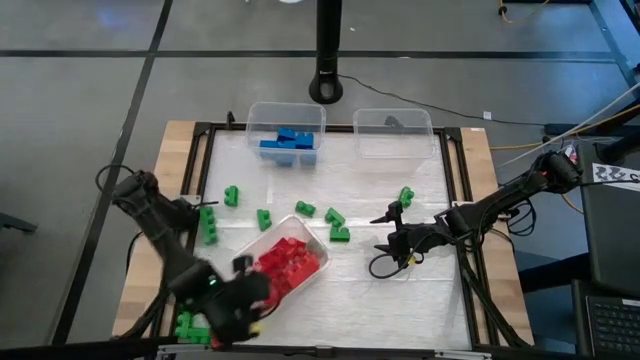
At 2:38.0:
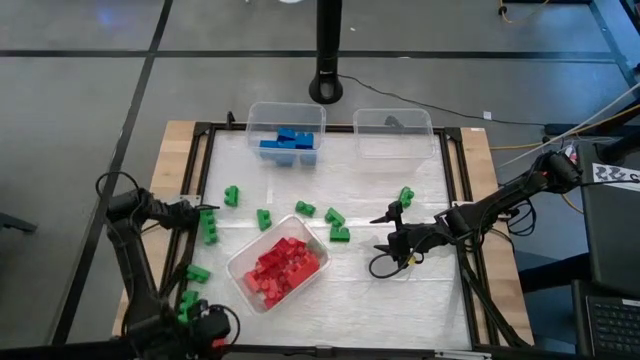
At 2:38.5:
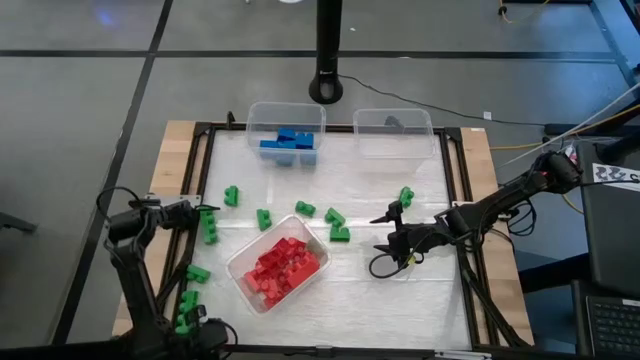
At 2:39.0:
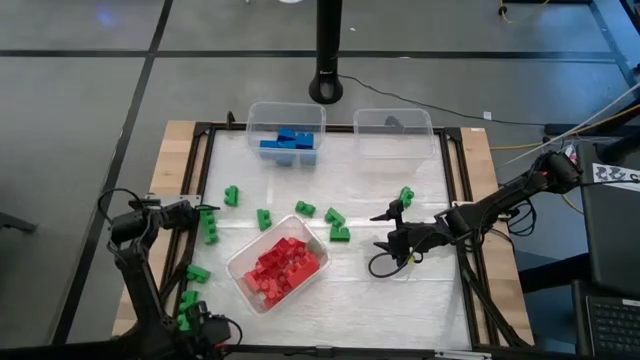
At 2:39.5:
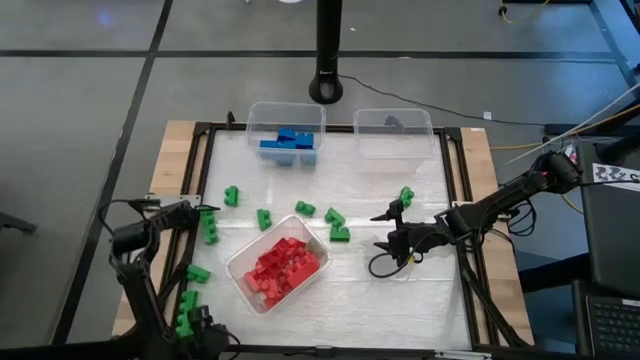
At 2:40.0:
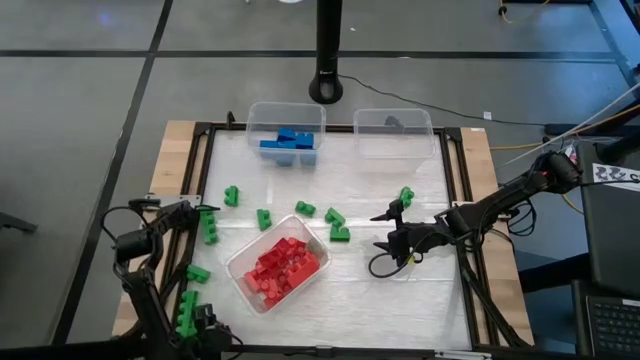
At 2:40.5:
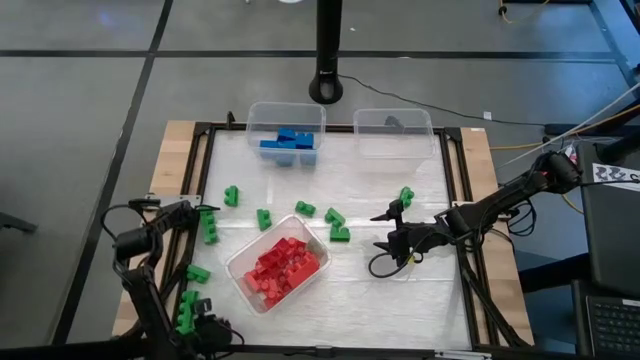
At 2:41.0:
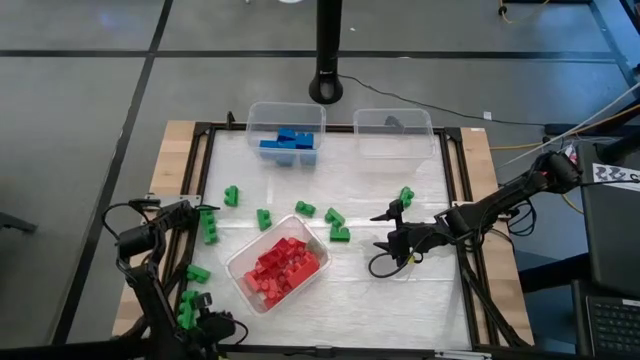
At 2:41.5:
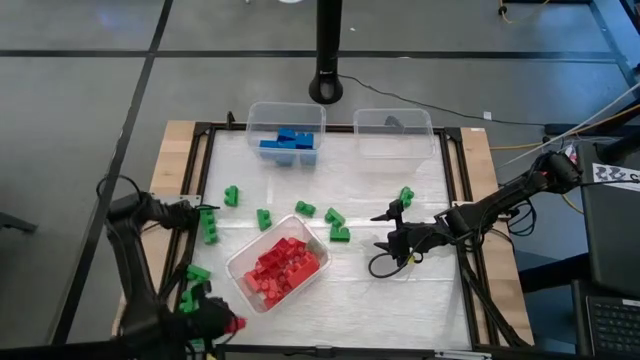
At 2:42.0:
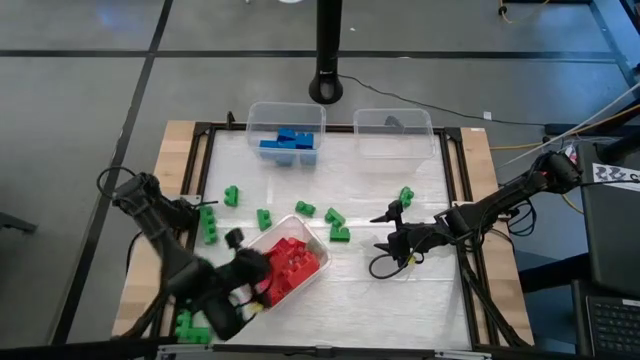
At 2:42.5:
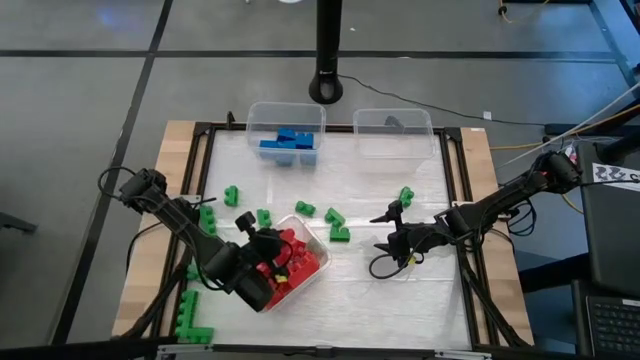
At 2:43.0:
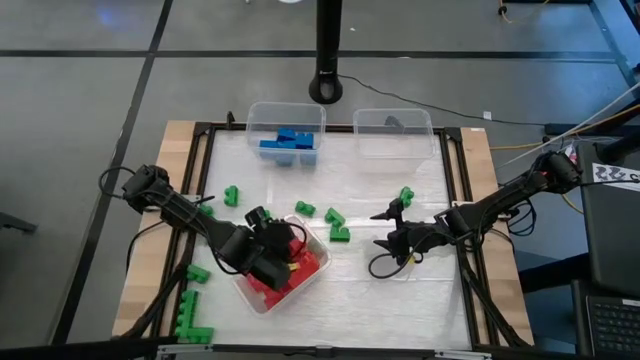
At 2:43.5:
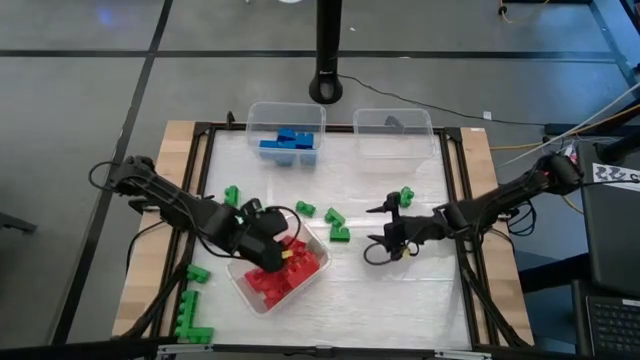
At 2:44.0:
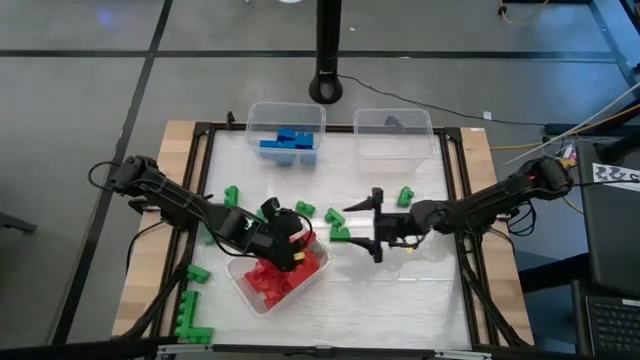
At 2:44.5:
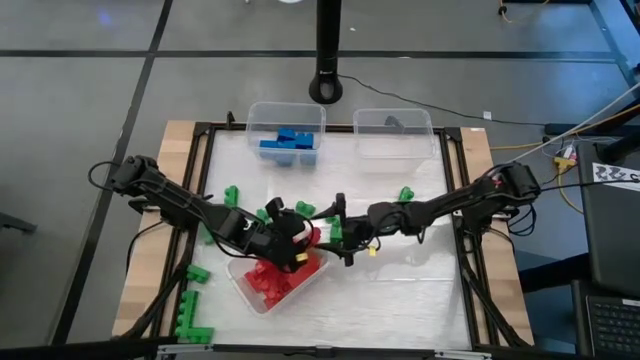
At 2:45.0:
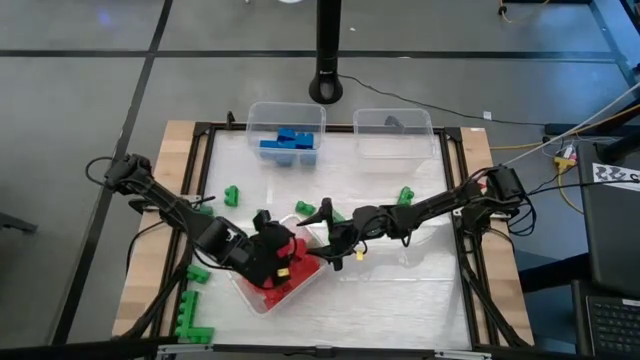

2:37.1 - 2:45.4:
Task: Sort blocks
Put the red game piece into the center transparent bin

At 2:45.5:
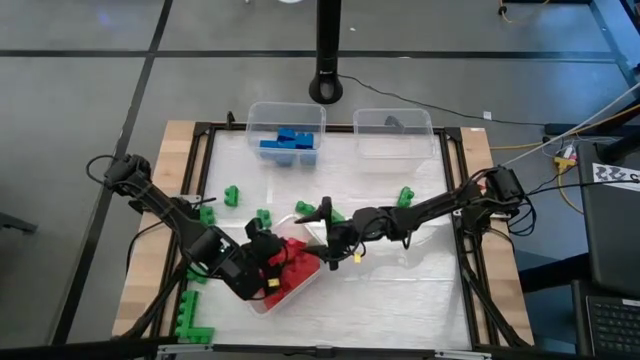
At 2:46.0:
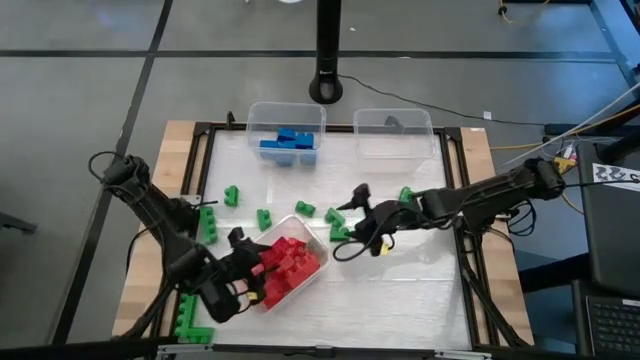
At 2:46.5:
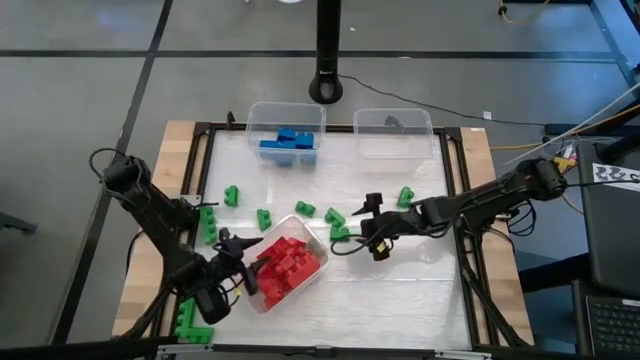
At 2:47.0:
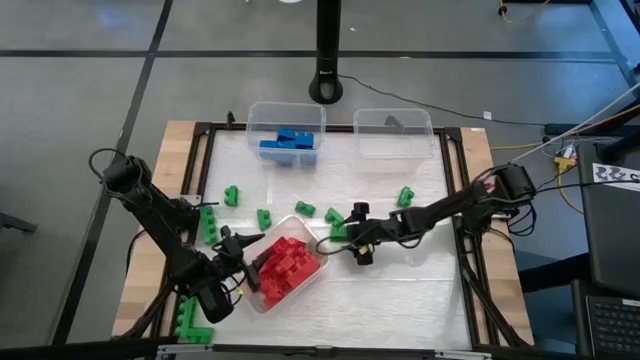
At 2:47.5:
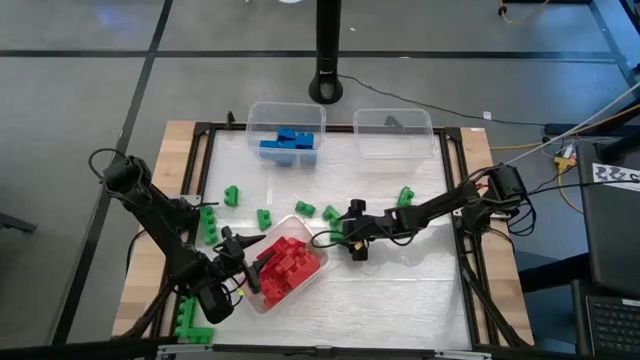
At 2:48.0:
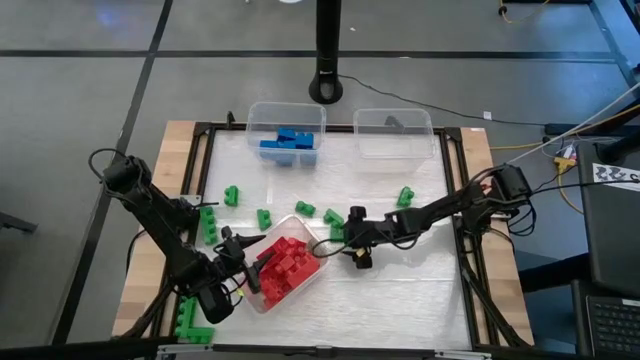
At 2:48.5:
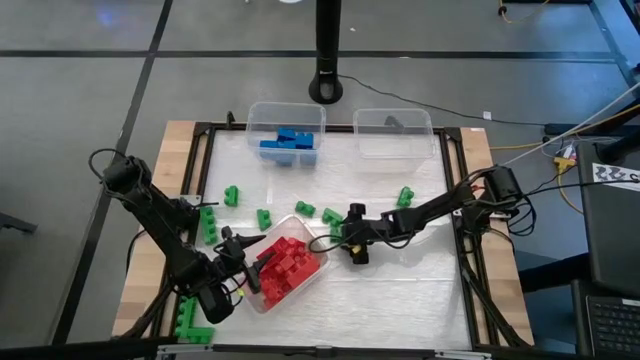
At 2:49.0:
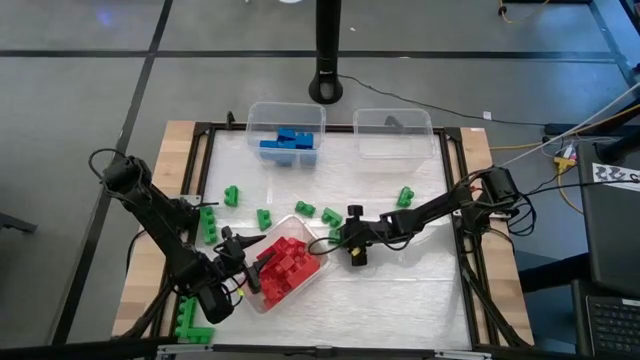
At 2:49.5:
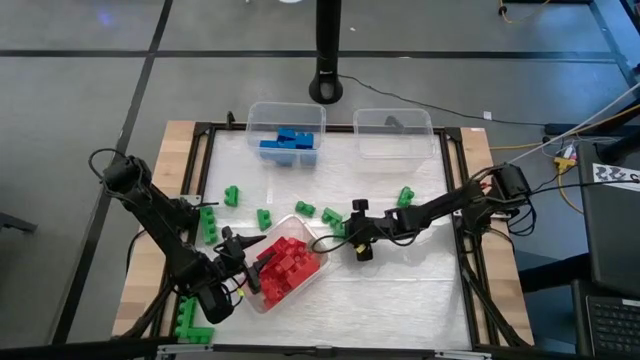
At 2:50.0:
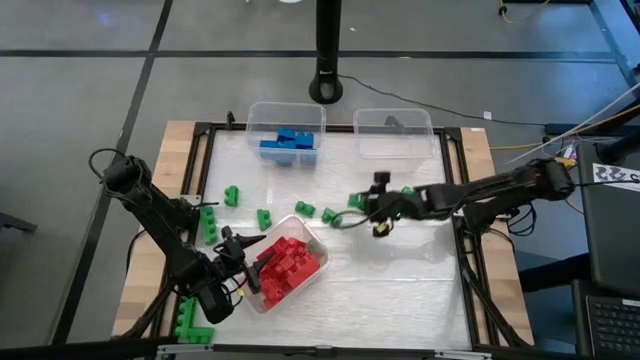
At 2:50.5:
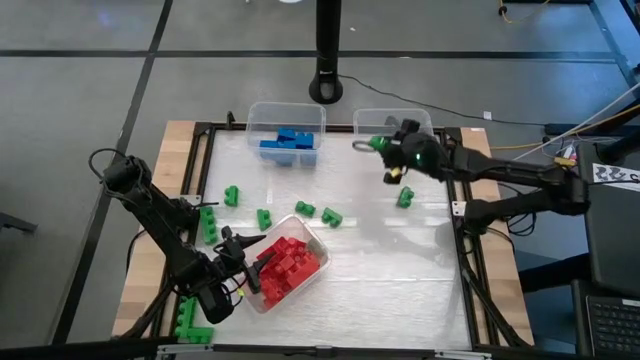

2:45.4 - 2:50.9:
Put the green game piece into the top right transparent bin

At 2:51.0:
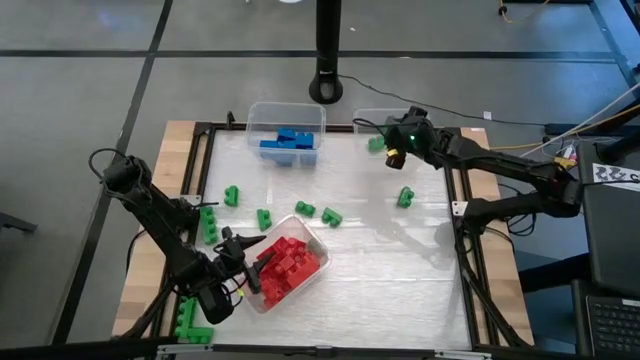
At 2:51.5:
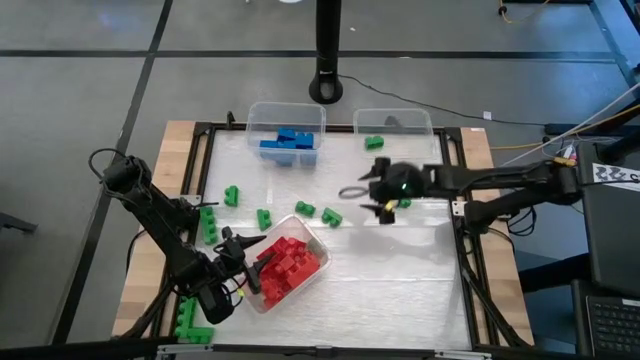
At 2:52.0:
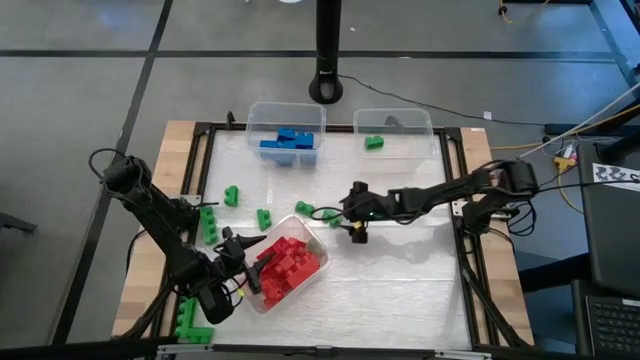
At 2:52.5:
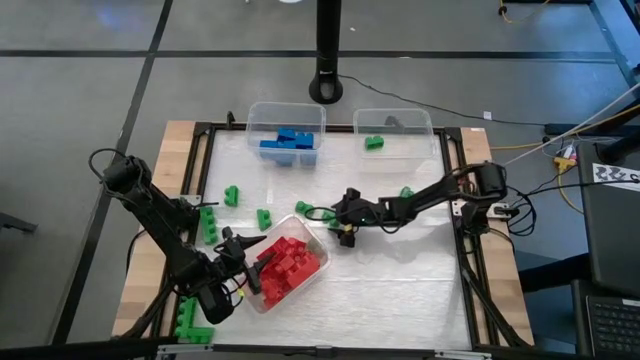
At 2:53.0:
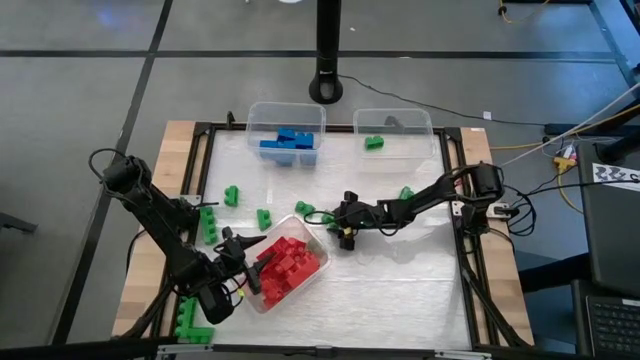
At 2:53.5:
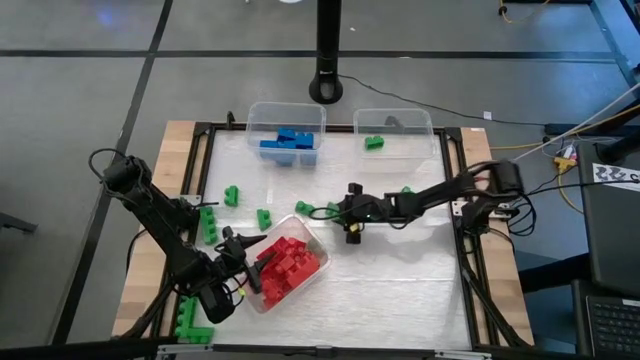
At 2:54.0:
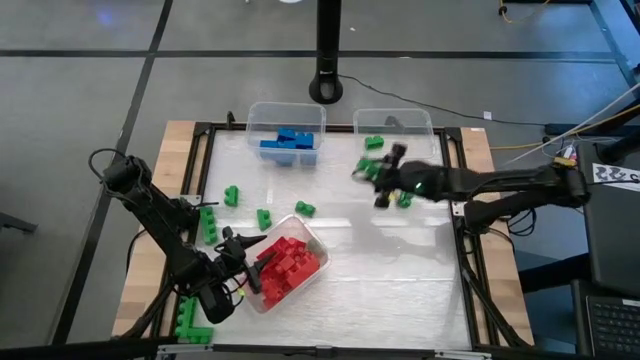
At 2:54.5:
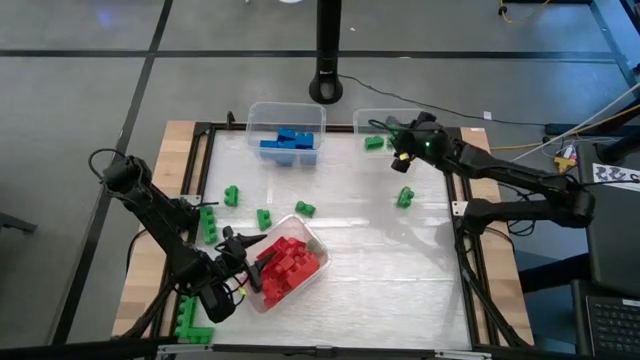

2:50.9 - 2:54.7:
Put the green game piece into the top right transparent bin

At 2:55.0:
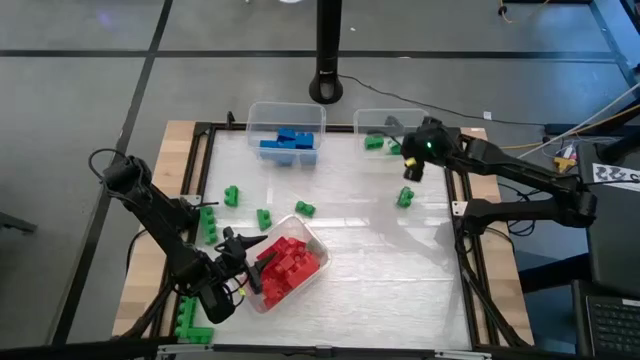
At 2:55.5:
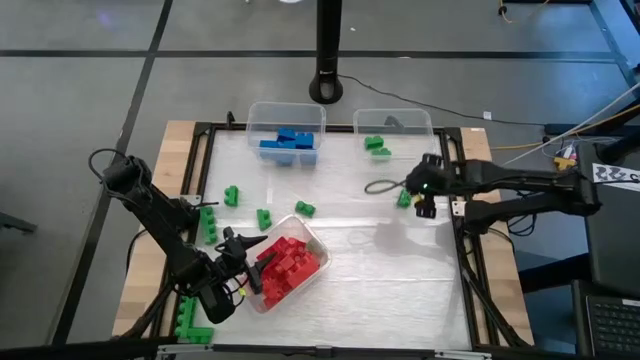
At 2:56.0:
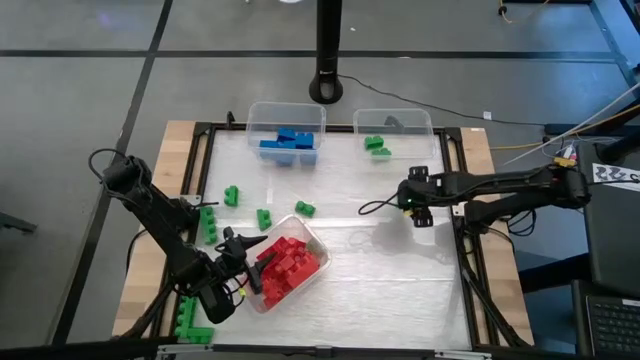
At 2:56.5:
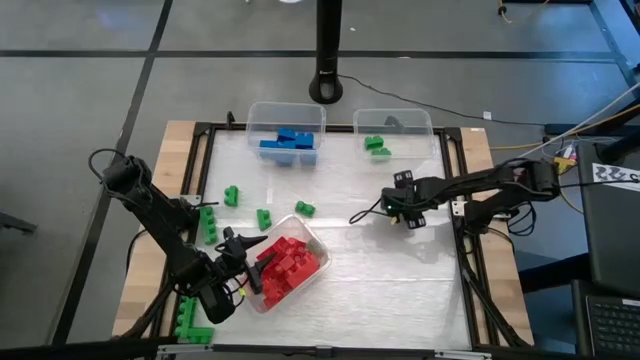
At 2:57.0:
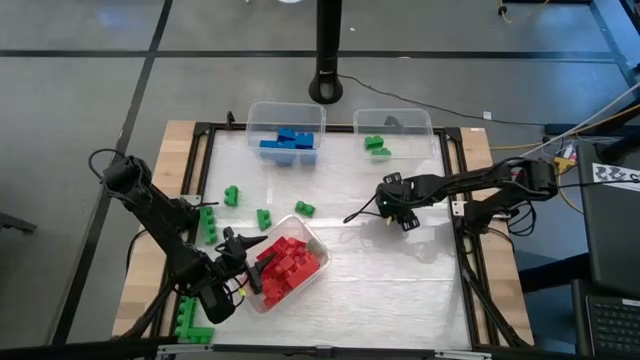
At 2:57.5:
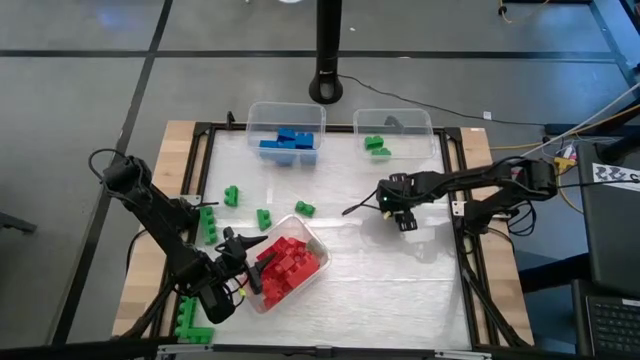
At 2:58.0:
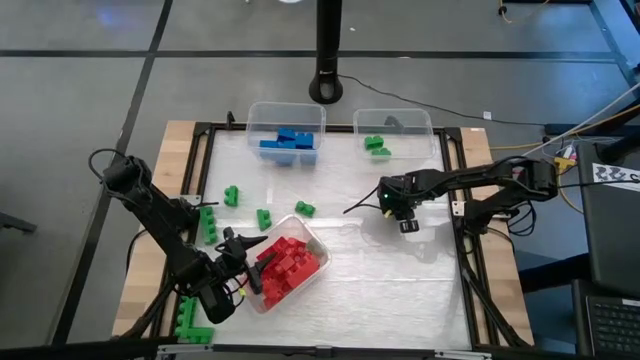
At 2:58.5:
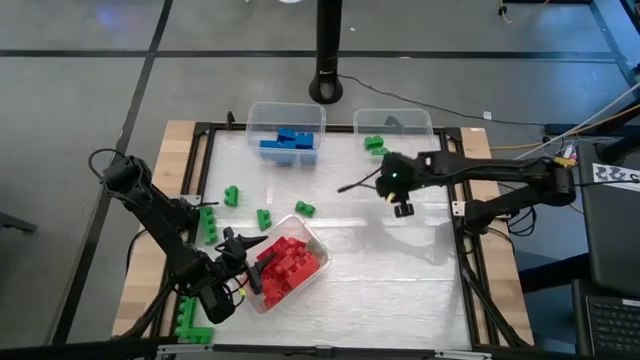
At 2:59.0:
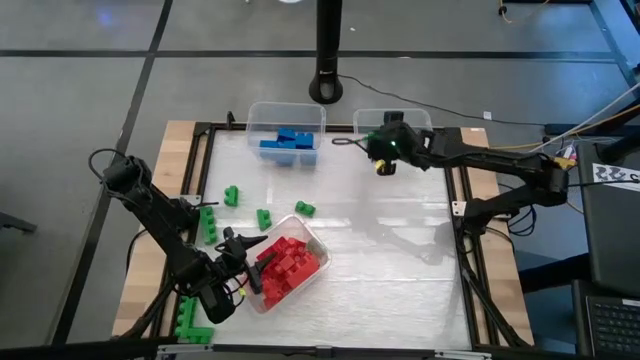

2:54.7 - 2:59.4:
Put the green game piece into the top right transparent bin
